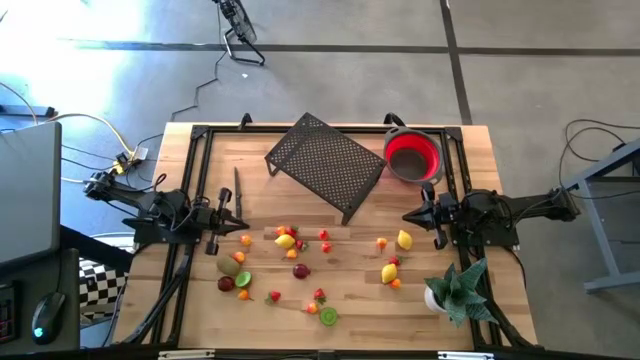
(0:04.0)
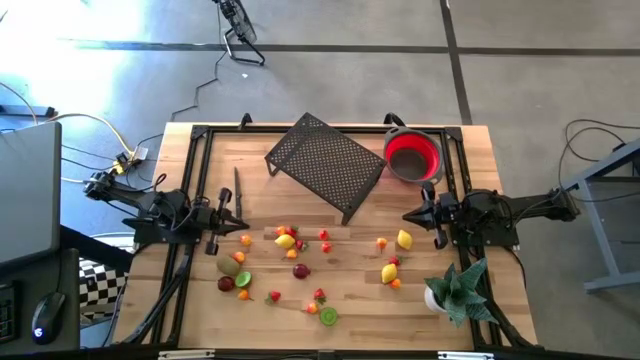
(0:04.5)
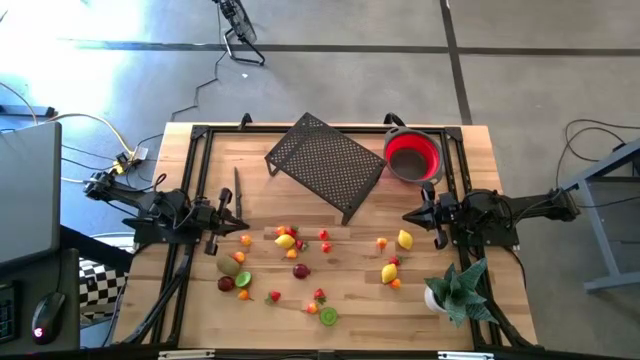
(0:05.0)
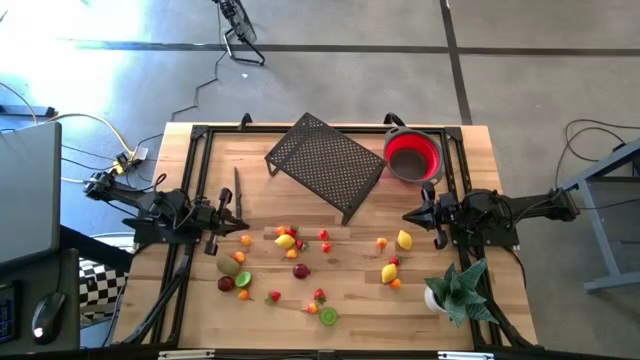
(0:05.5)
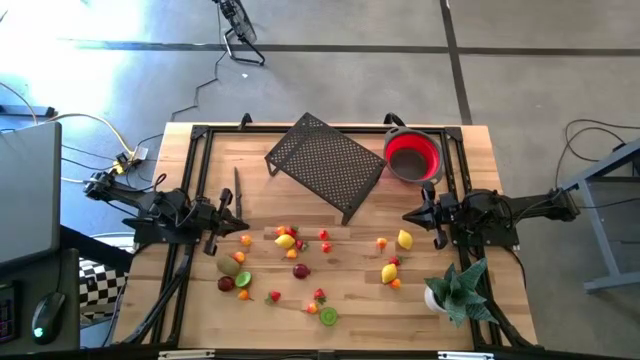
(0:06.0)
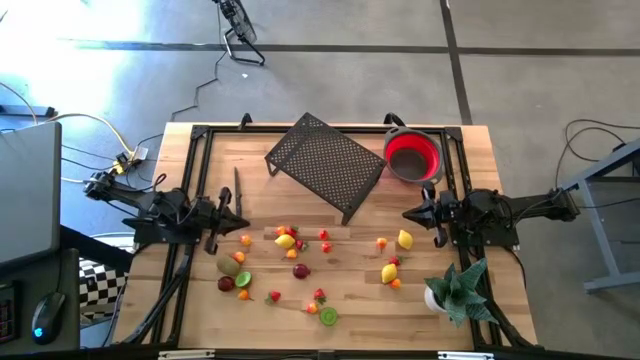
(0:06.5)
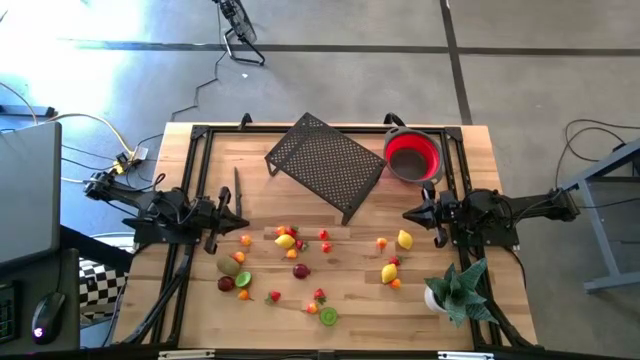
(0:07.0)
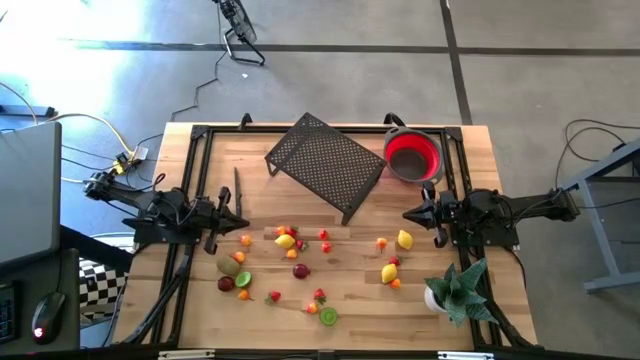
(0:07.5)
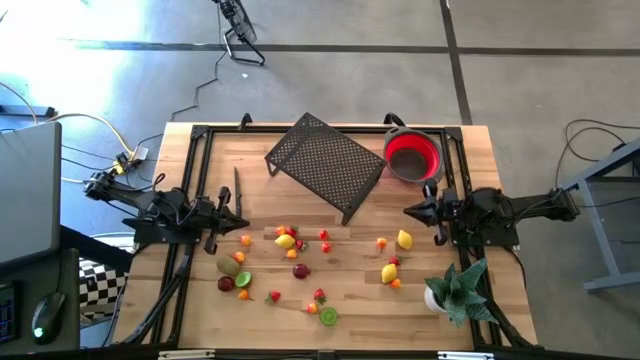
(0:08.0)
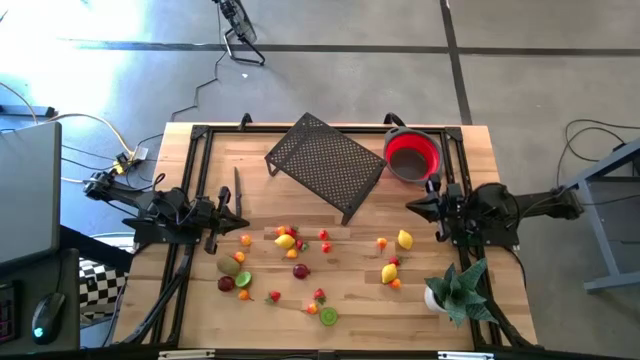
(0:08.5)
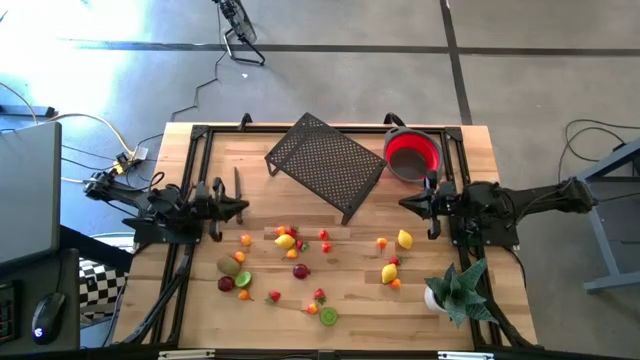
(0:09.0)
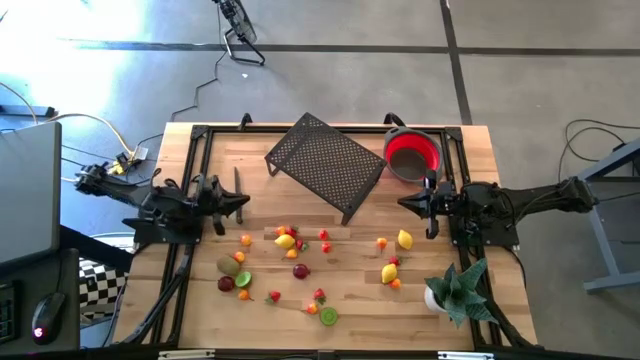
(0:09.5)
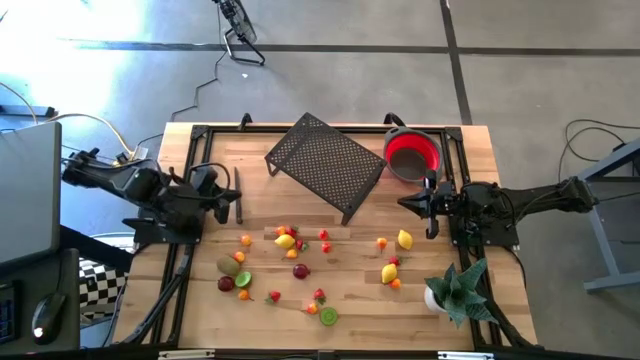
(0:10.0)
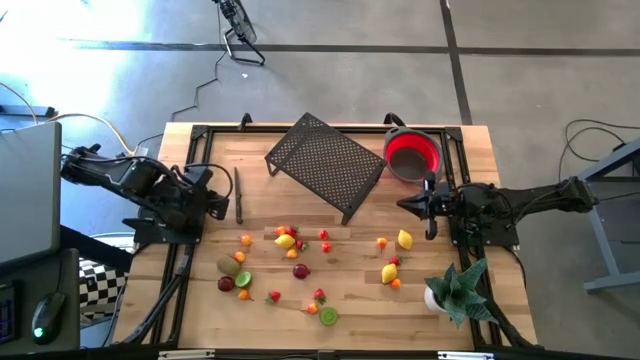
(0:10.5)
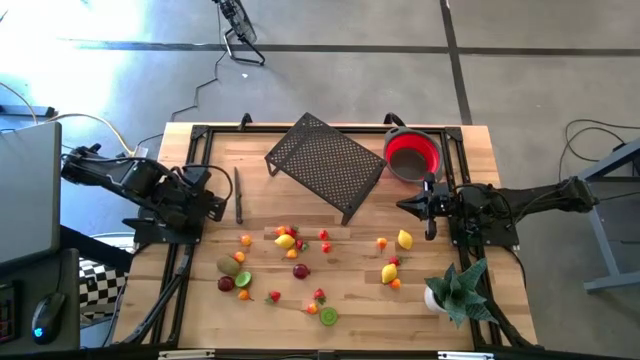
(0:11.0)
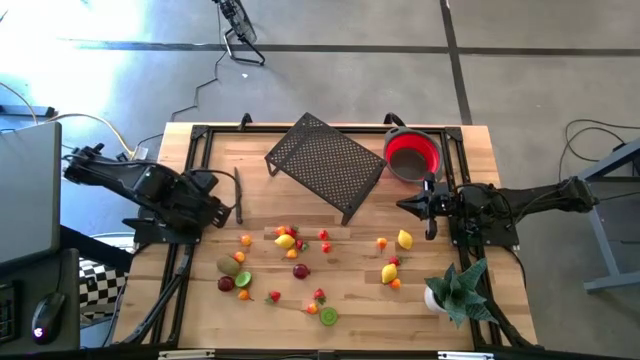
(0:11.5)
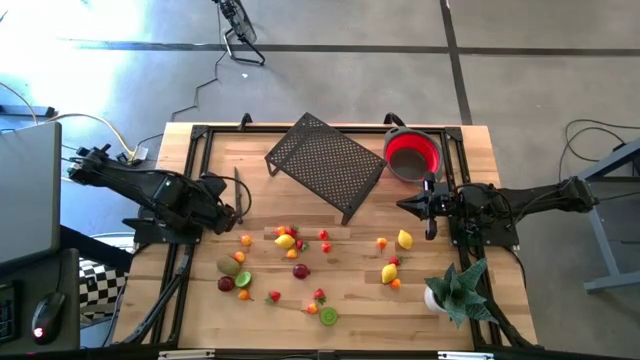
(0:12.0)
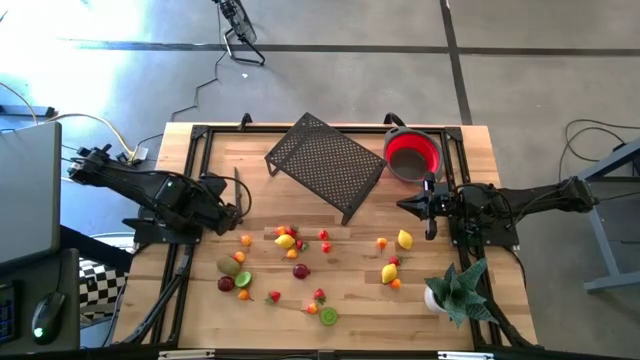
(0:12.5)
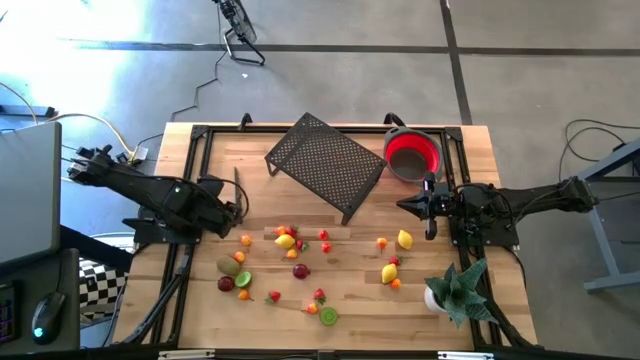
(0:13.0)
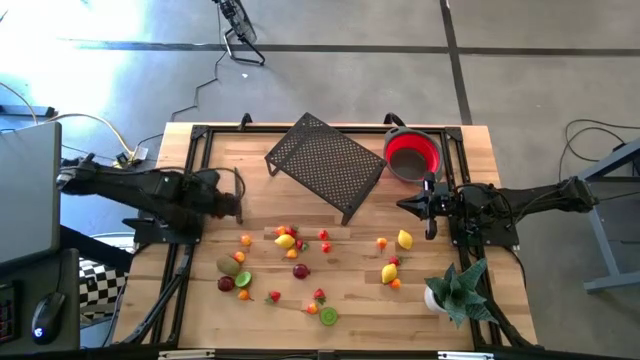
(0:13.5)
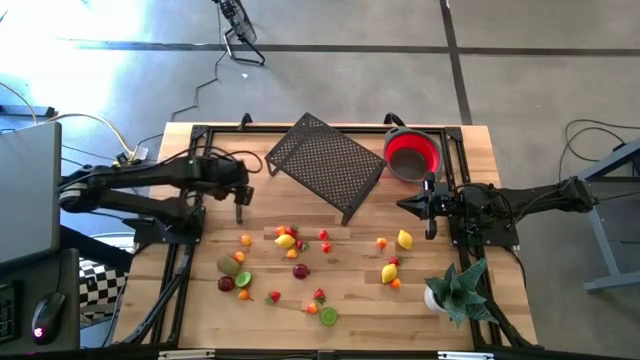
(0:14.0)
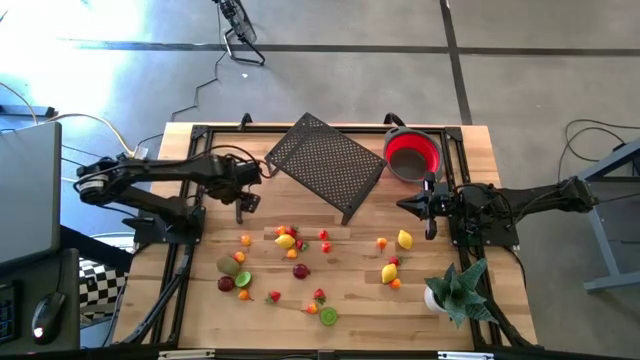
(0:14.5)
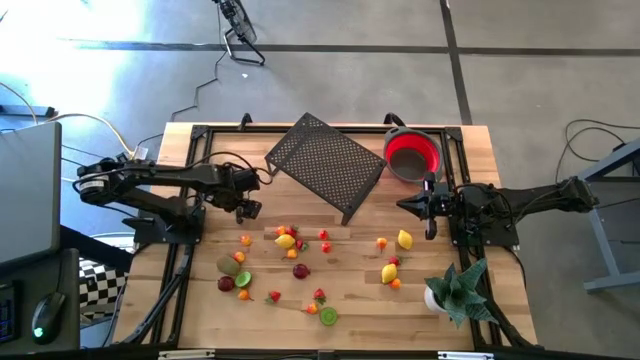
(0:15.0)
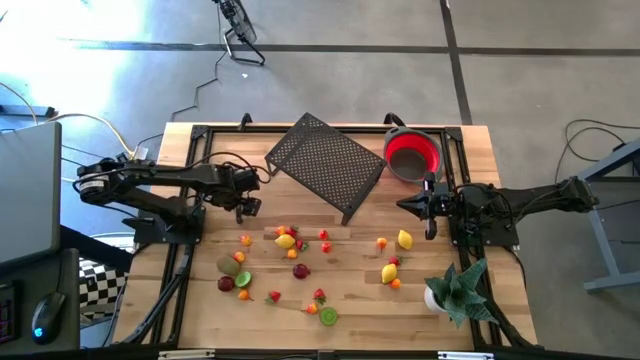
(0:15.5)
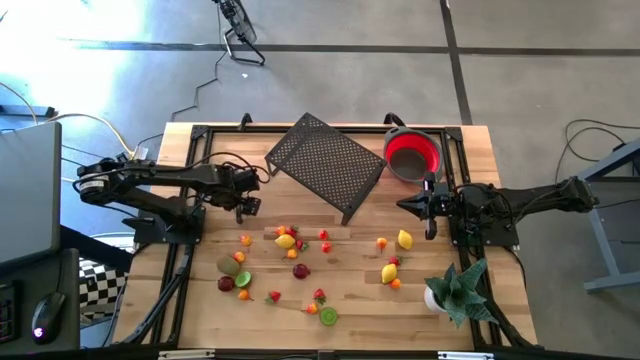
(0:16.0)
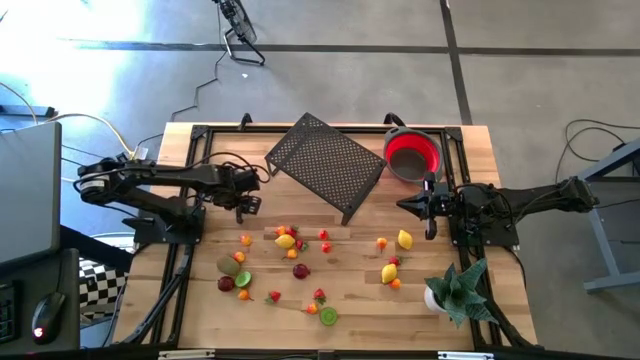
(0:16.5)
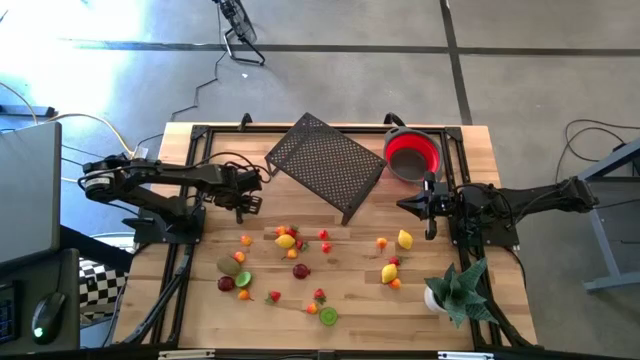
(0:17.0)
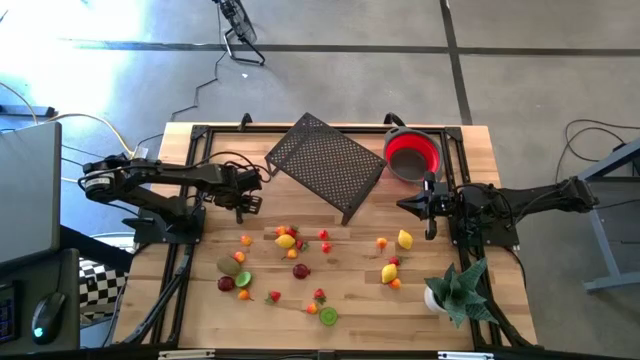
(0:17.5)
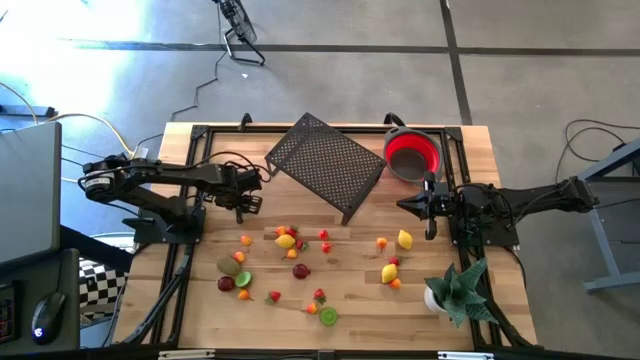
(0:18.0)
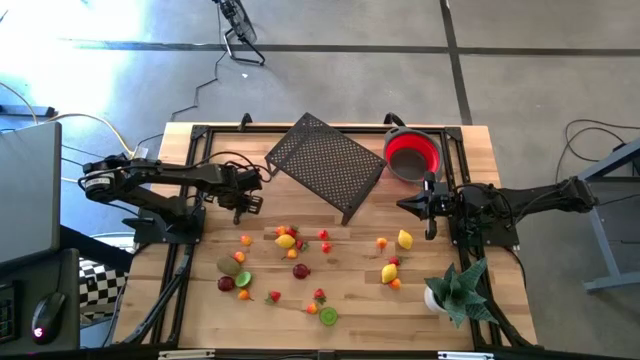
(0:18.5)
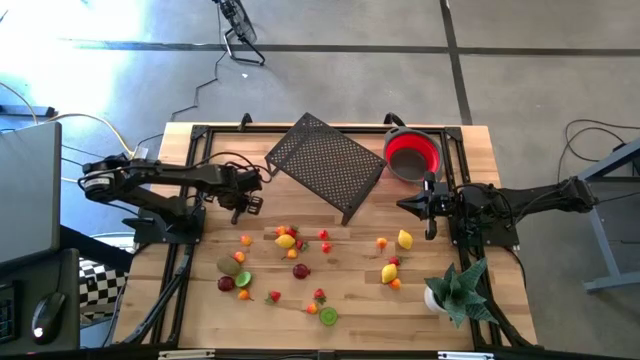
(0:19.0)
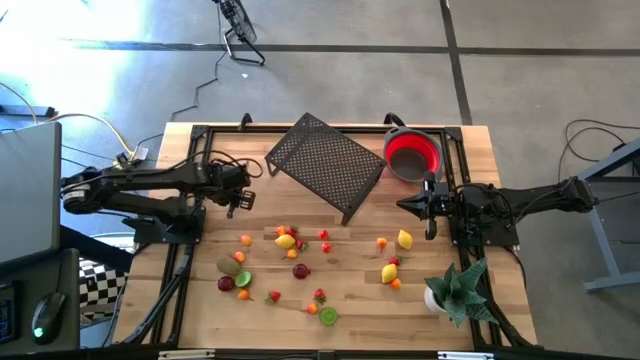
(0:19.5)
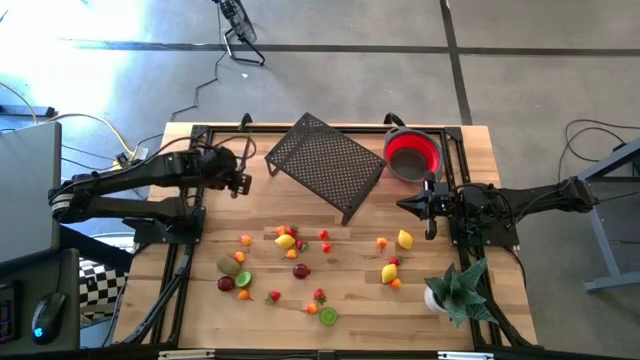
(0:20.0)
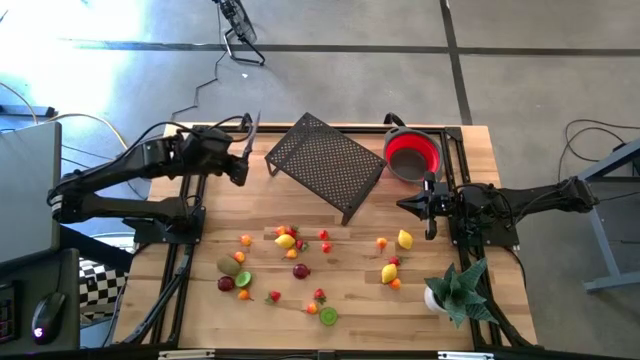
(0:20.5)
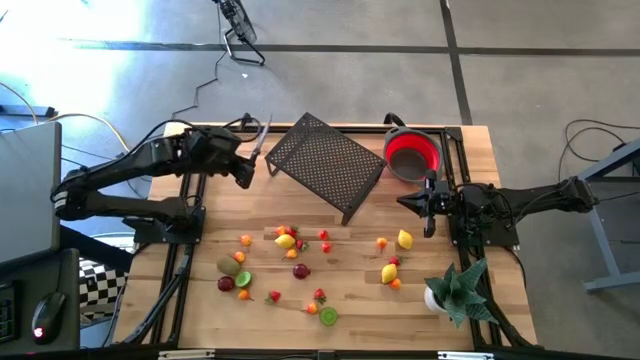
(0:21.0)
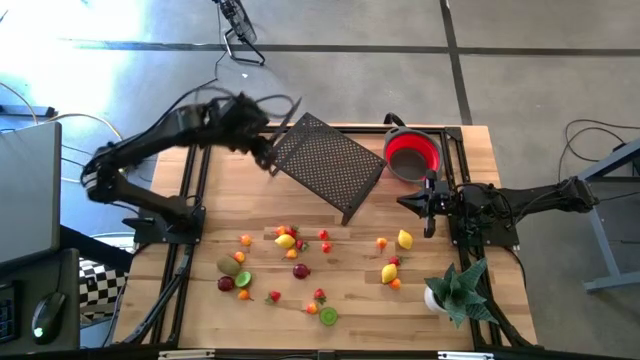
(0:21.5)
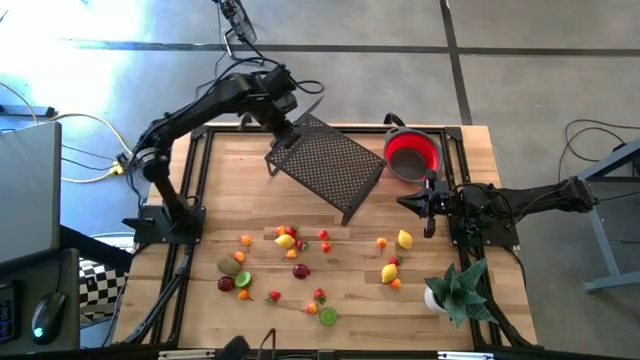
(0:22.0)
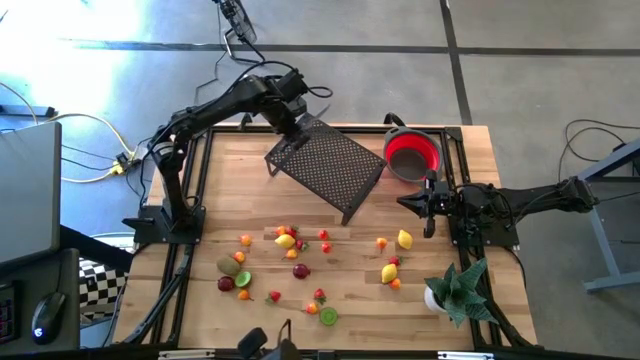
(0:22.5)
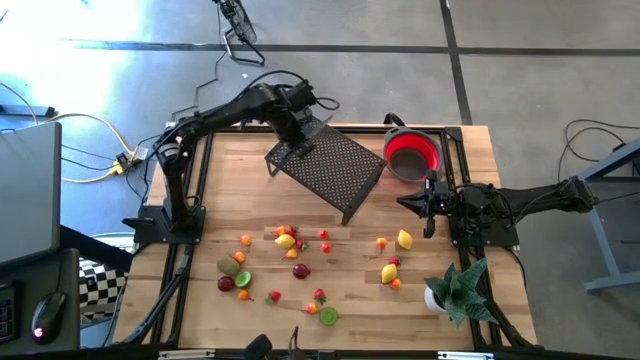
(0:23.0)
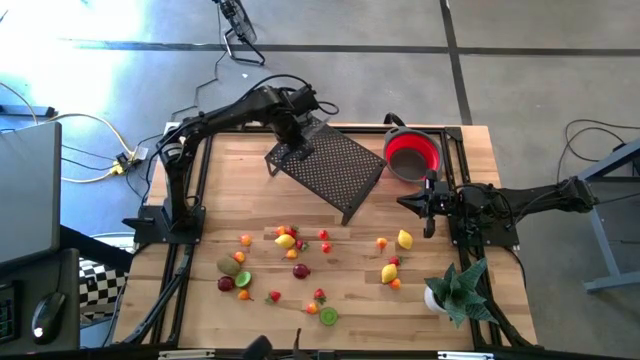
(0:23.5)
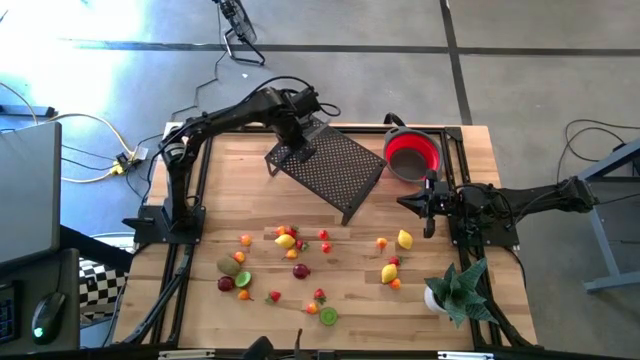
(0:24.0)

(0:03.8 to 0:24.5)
Task: Pick & Place Fruit
Put the knife on the shelf
